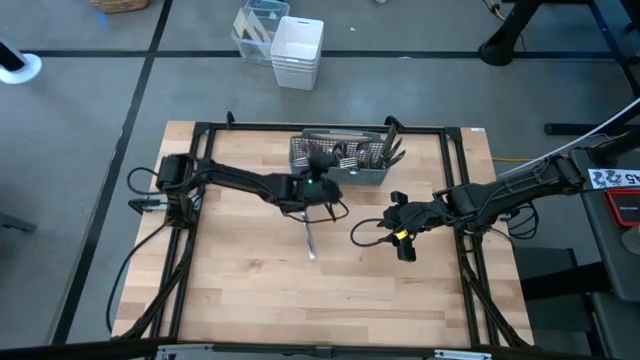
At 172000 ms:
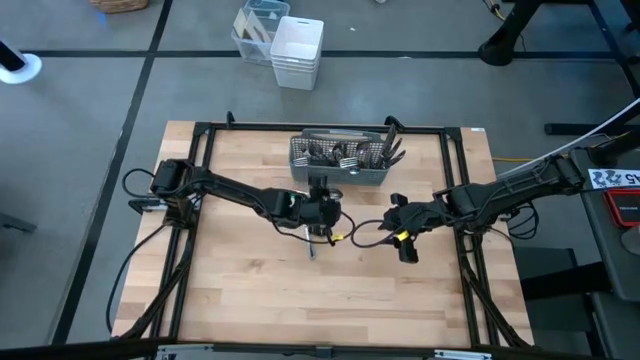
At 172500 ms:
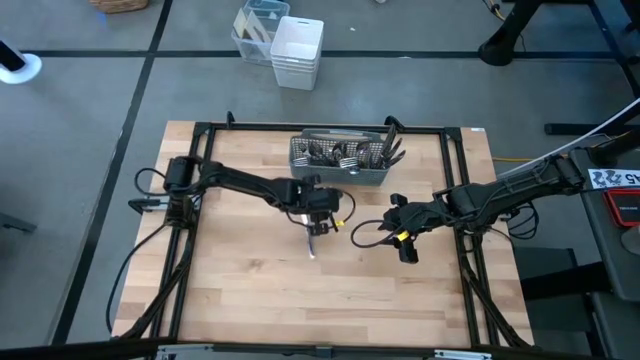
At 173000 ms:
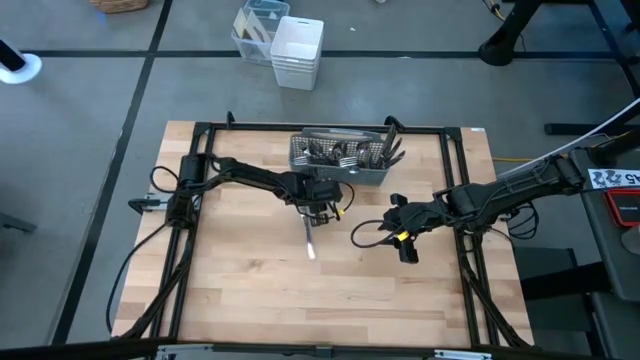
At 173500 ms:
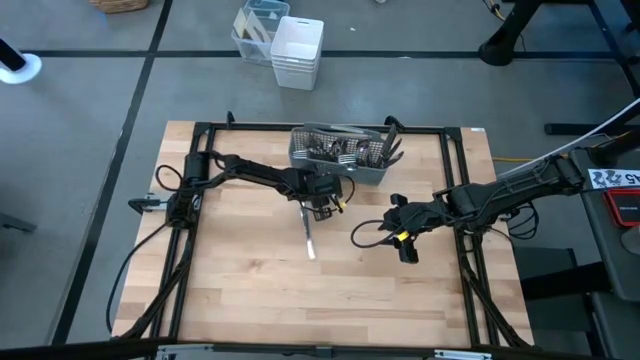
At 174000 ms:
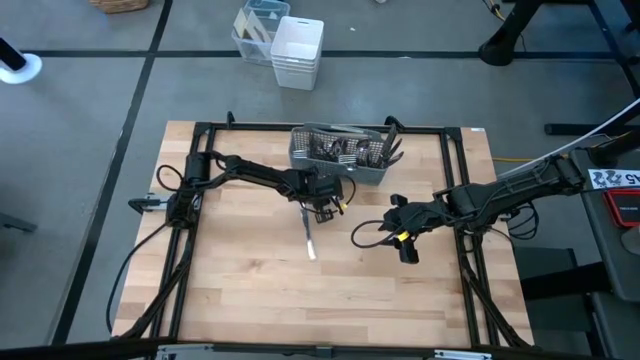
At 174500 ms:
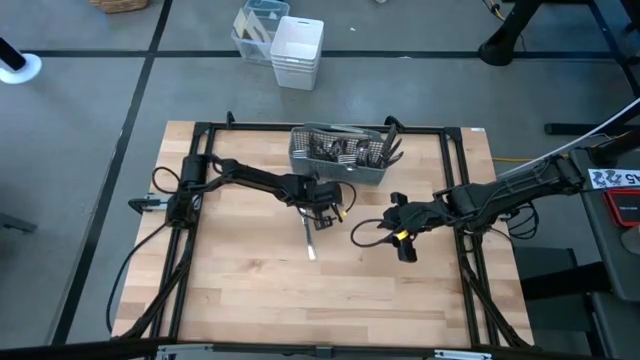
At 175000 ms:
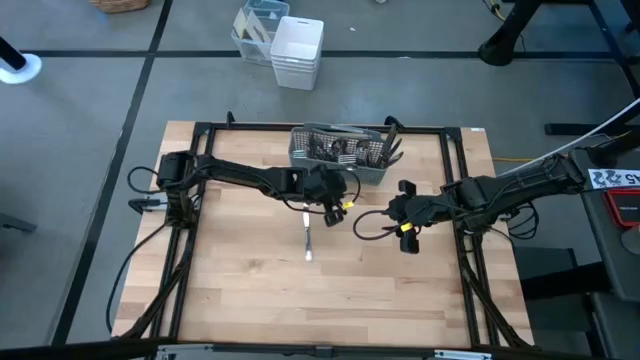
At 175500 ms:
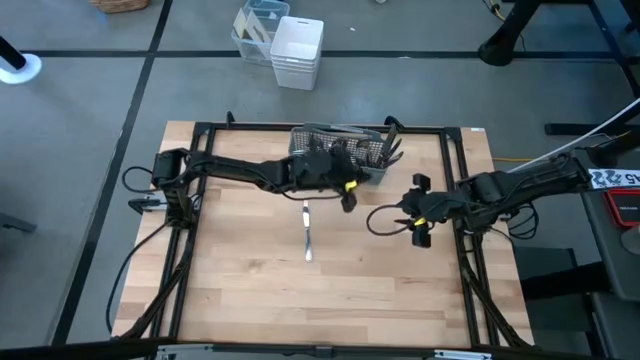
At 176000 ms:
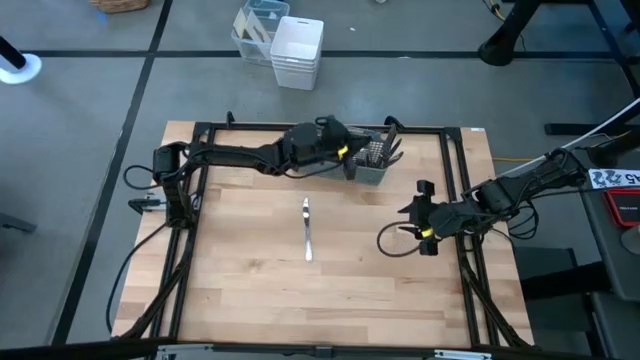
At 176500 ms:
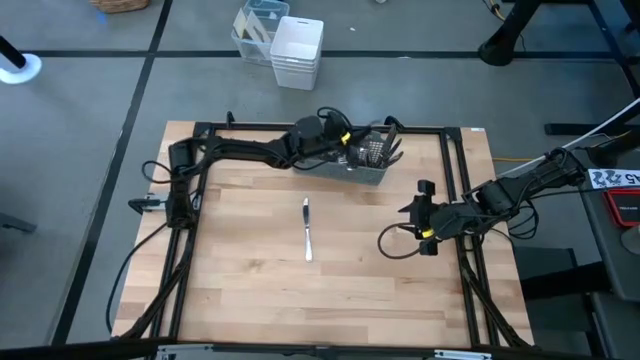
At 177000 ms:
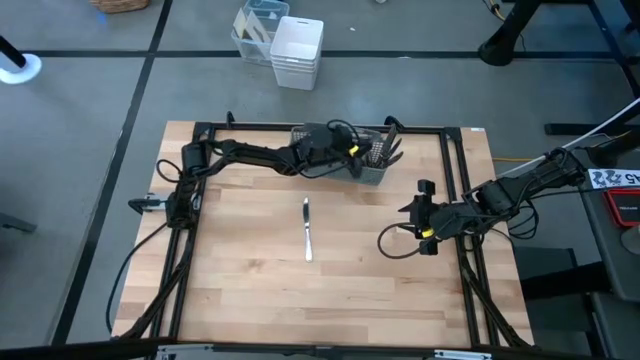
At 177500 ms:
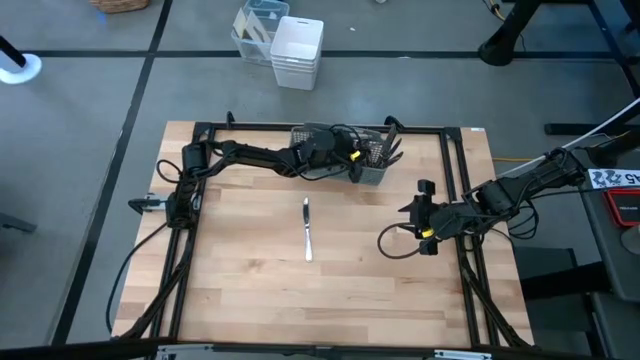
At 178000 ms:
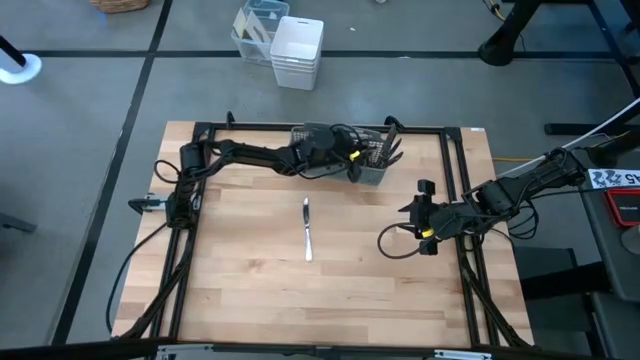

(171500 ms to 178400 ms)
Task: Sort silverware
Put the spoon into the silverware rack

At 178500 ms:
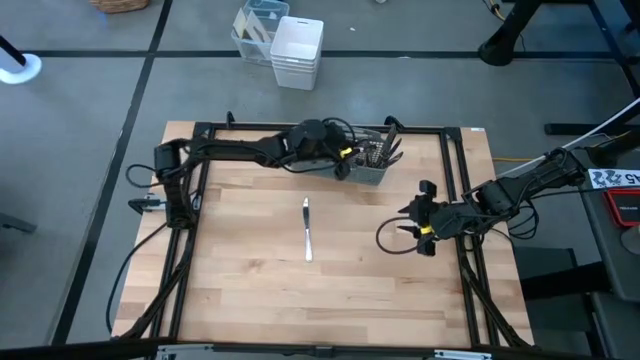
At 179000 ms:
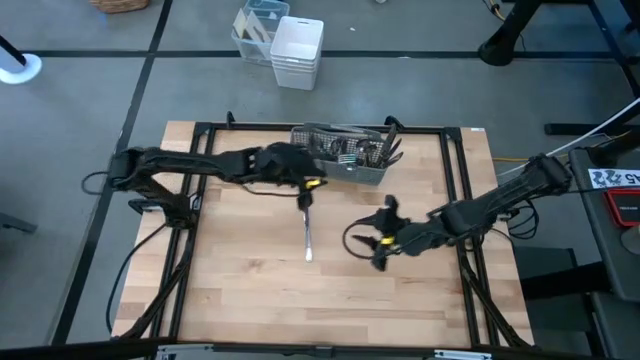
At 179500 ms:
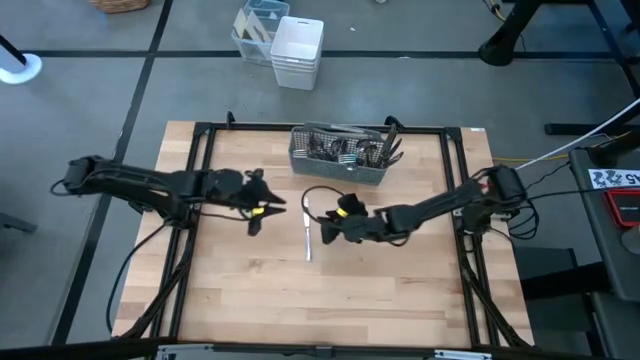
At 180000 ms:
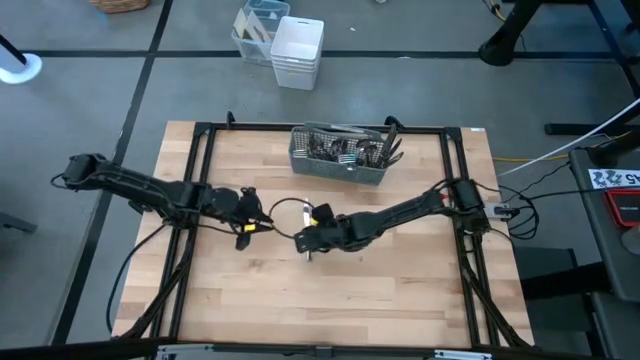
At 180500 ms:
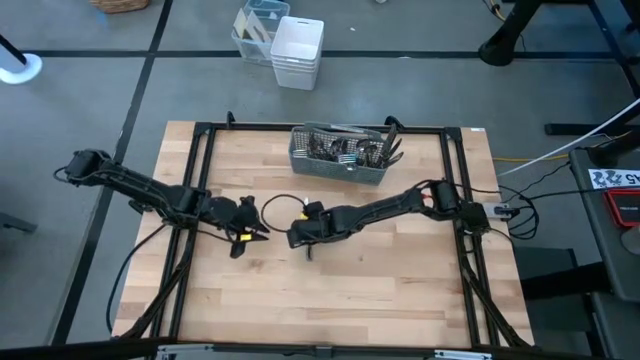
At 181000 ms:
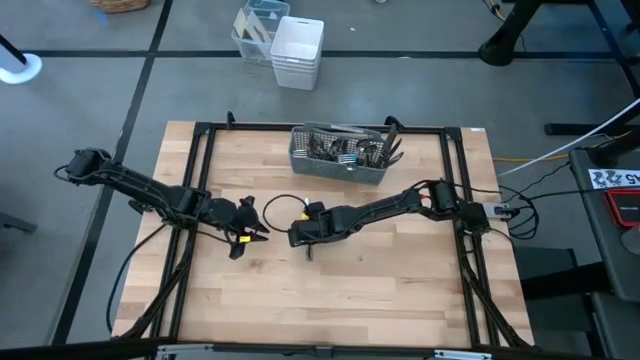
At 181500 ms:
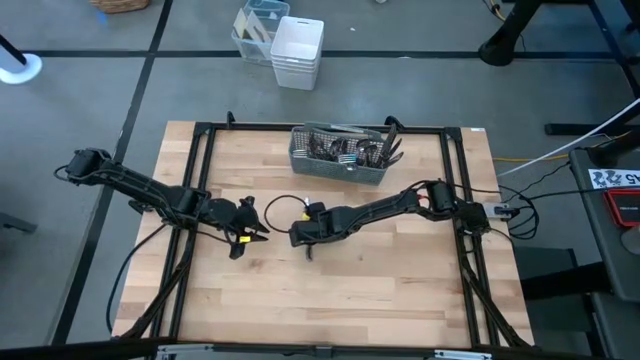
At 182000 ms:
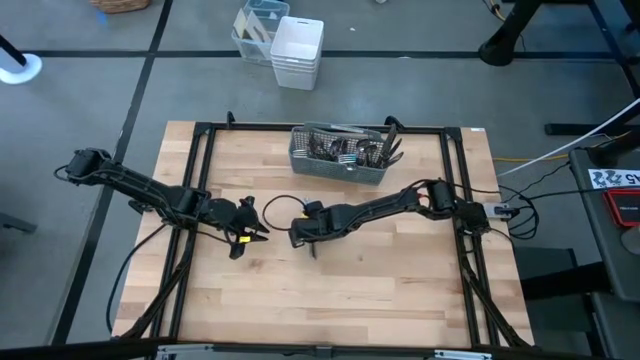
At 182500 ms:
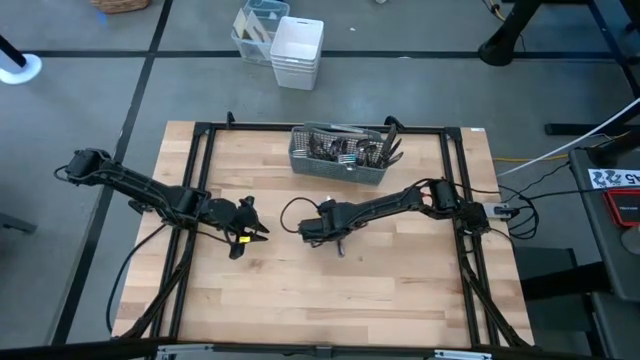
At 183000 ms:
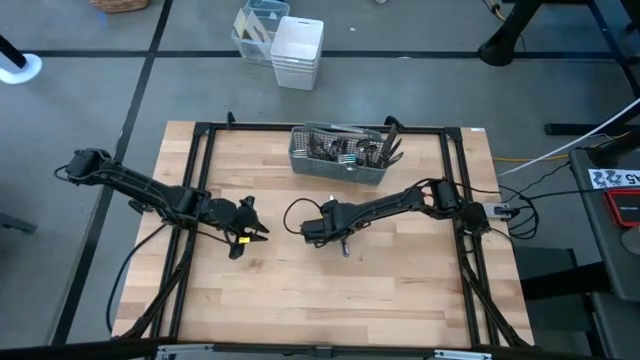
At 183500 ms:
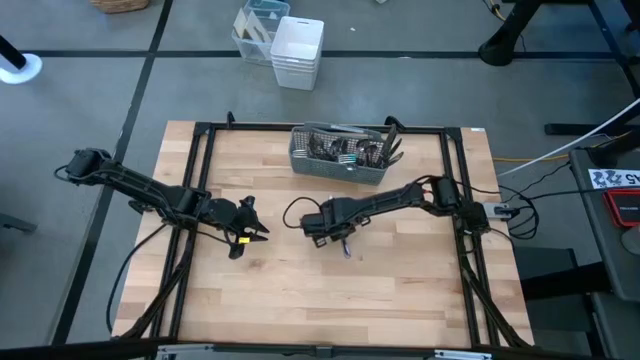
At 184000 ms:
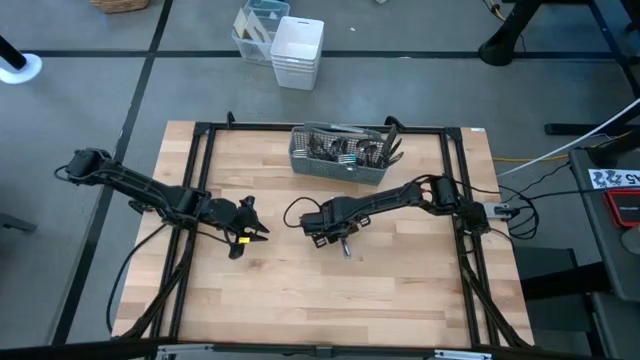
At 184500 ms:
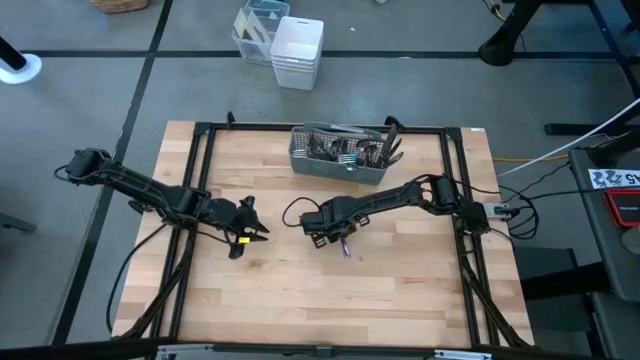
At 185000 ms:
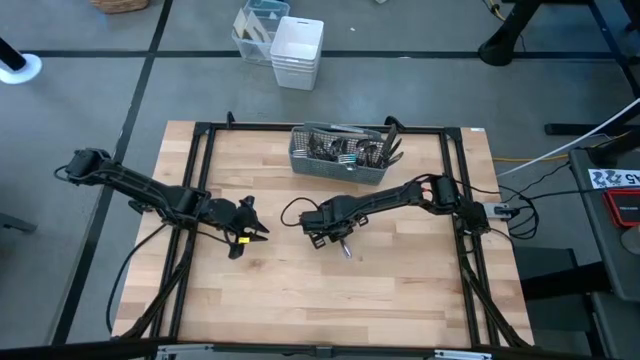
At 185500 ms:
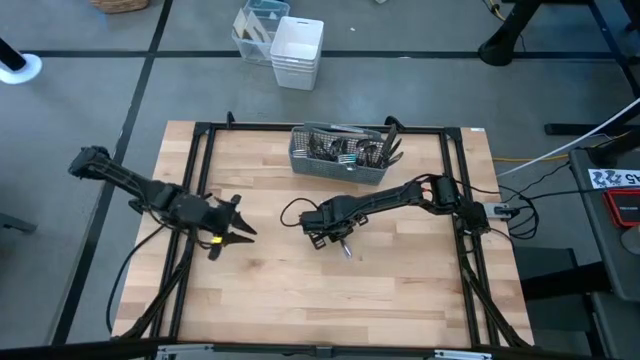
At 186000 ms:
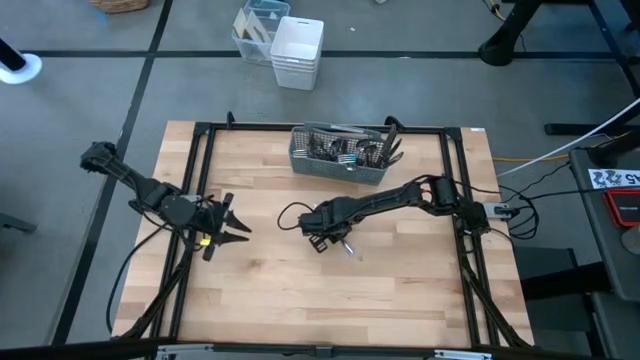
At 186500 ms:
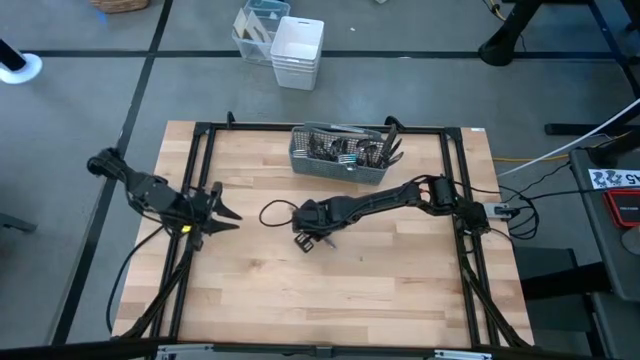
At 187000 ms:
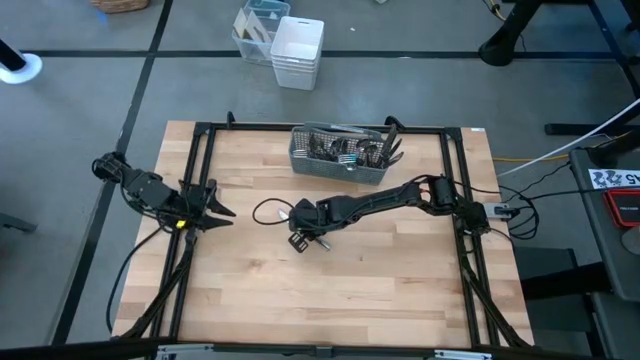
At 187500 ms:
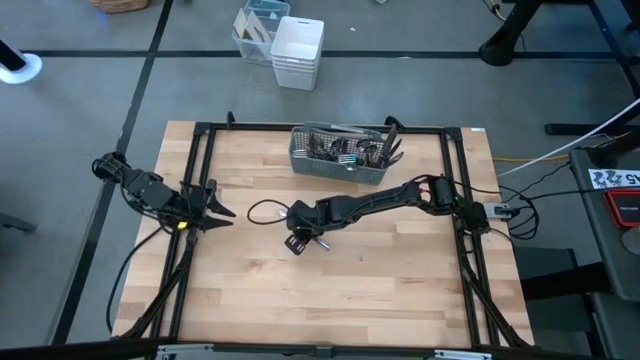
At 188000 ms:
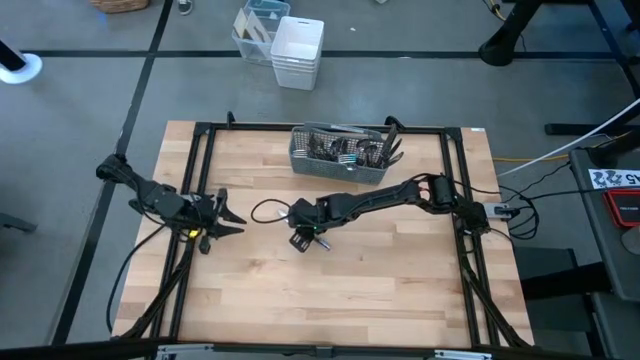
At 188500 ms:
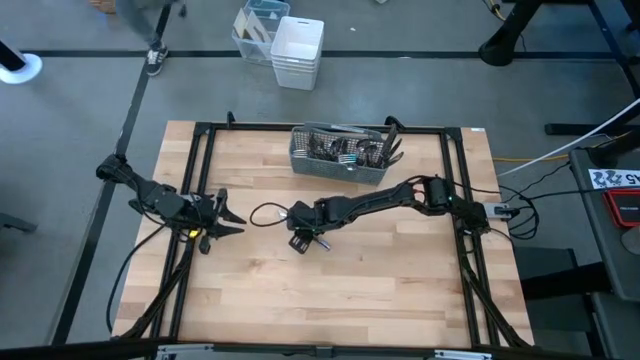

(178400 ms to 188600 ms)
Put the knife into the silverware rack

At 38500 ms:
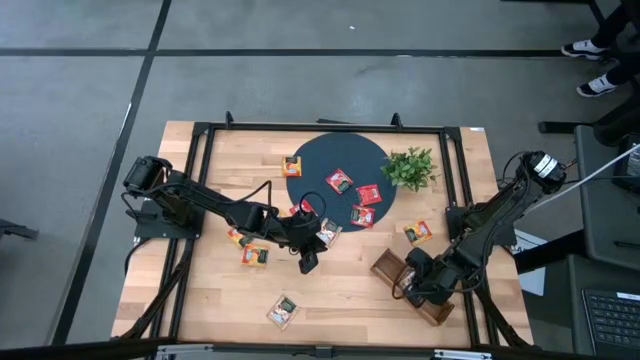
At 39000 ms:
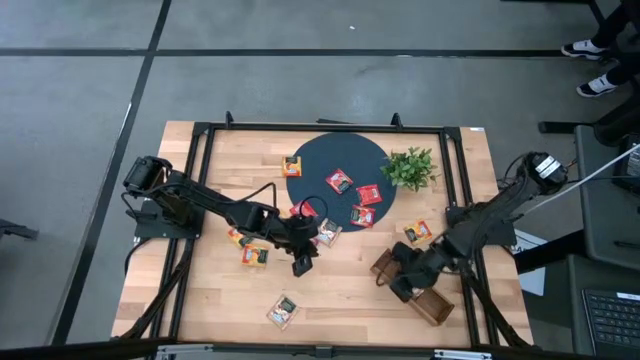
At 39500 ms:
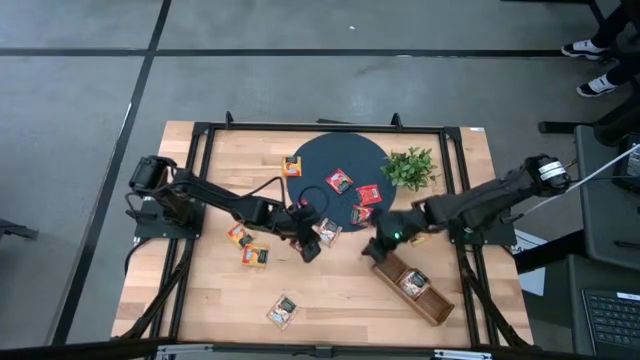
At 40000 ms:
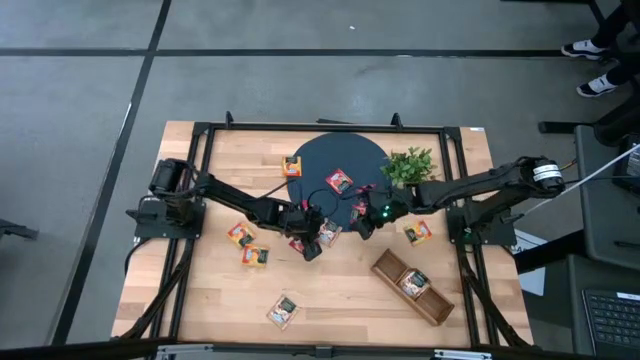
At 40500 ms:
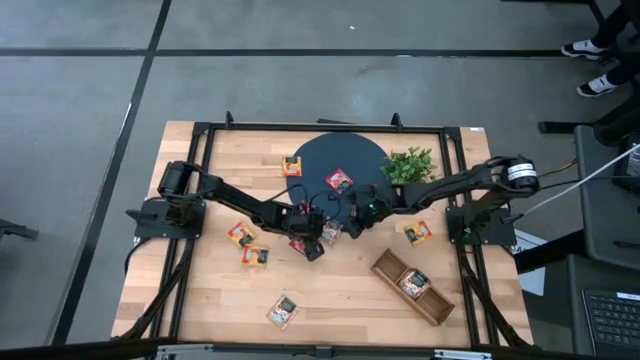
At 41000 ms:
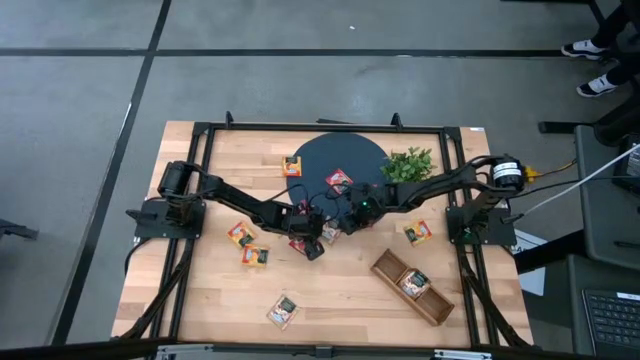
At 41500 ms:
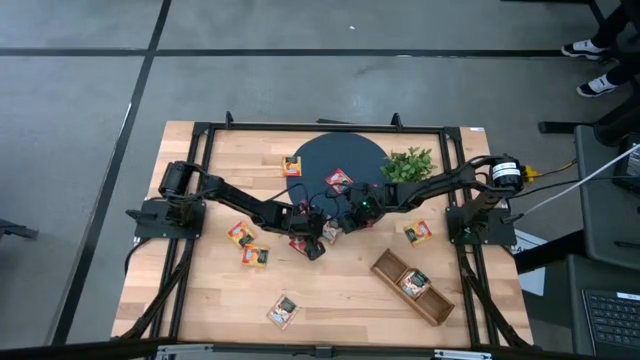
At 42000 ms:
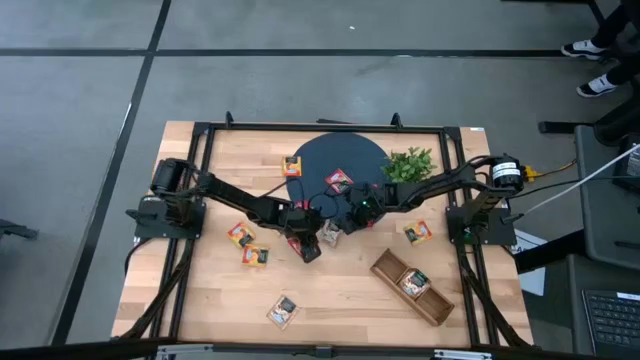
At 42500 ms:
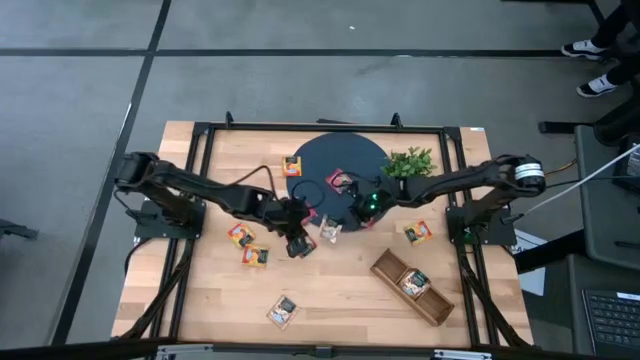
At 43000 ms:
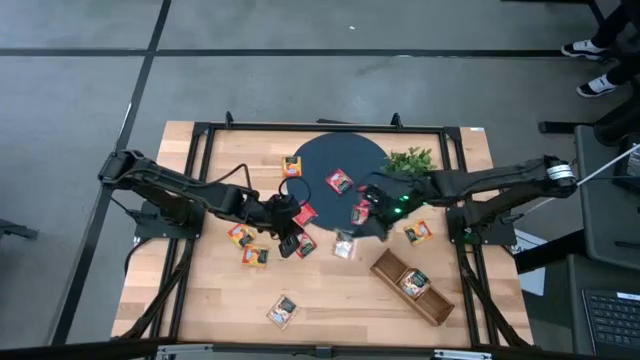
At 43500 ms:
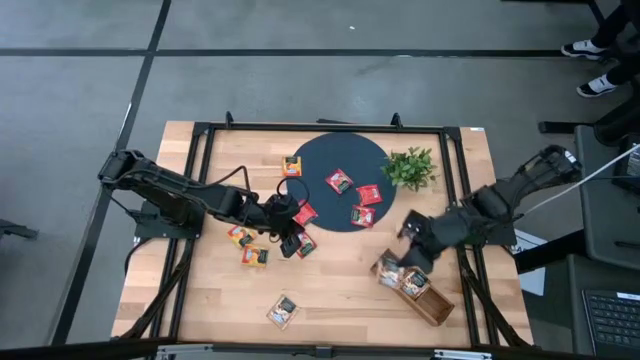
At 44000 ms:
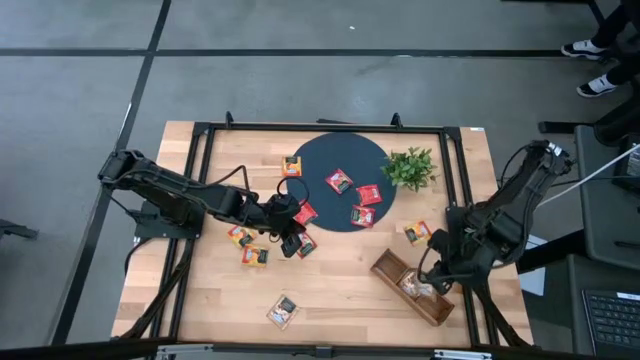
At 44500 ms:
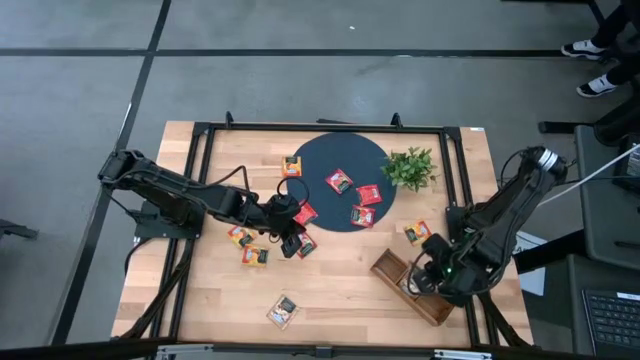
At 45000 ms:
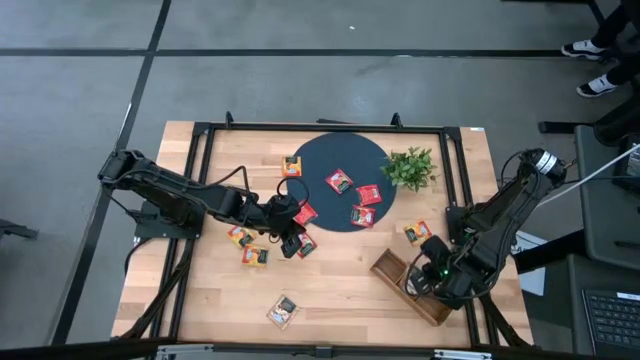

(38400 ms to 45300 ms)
Task: Pick & Place Tea
Put the brown tea bag into the middle section of the wooden organizer
